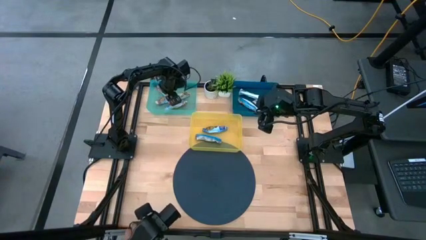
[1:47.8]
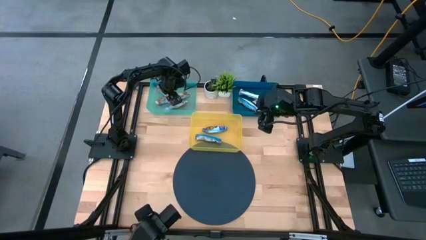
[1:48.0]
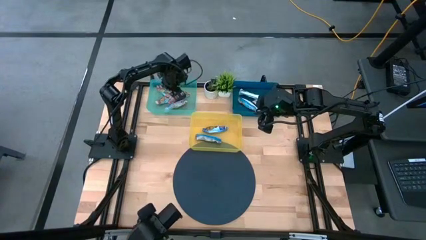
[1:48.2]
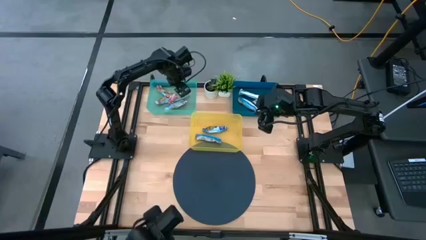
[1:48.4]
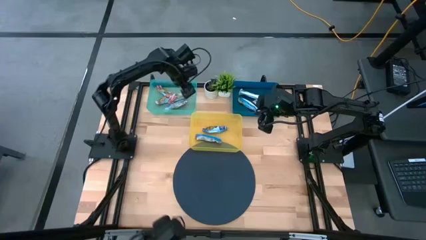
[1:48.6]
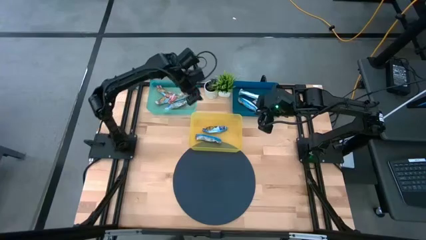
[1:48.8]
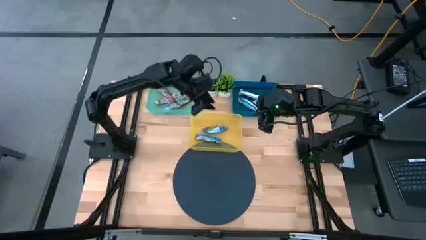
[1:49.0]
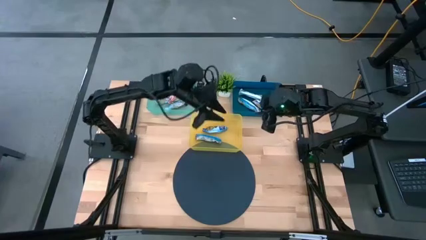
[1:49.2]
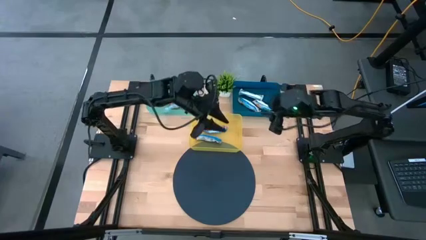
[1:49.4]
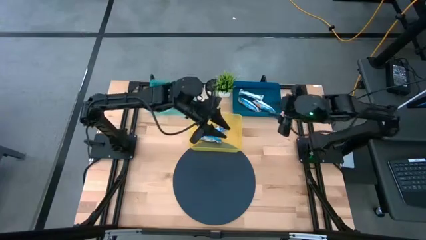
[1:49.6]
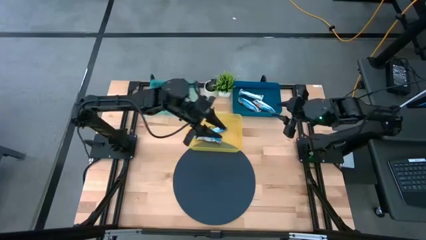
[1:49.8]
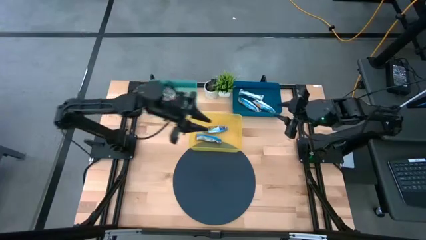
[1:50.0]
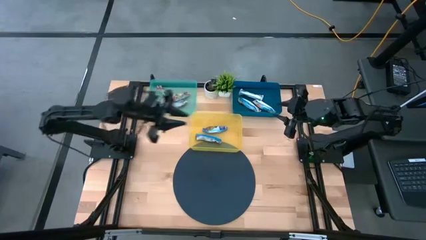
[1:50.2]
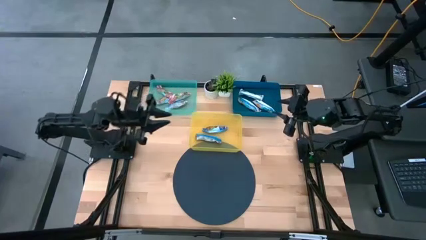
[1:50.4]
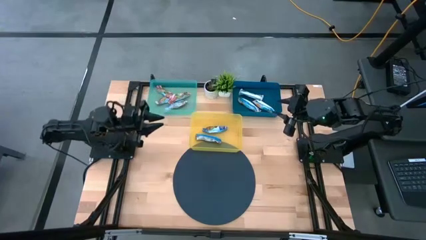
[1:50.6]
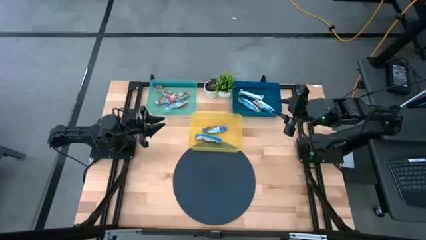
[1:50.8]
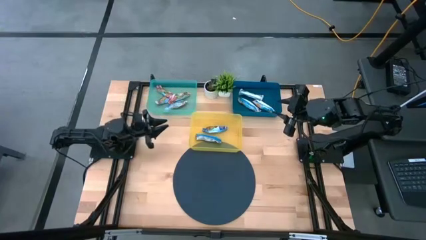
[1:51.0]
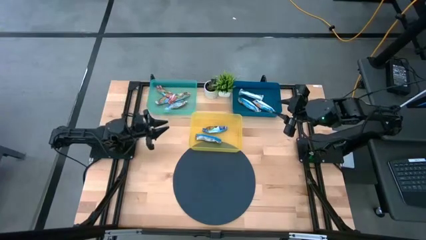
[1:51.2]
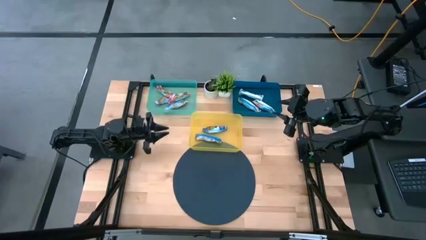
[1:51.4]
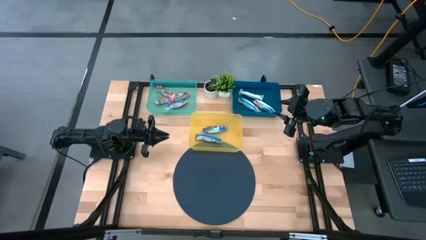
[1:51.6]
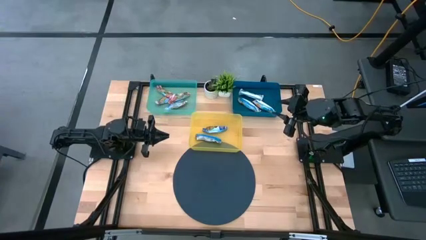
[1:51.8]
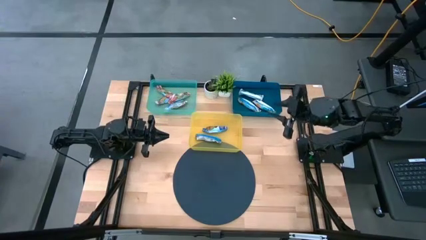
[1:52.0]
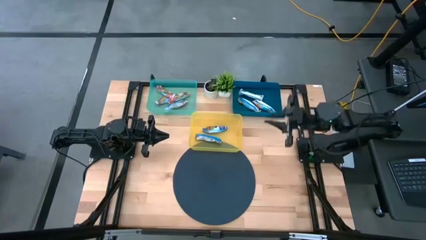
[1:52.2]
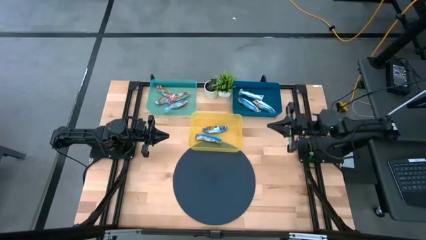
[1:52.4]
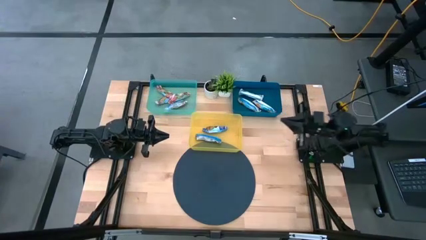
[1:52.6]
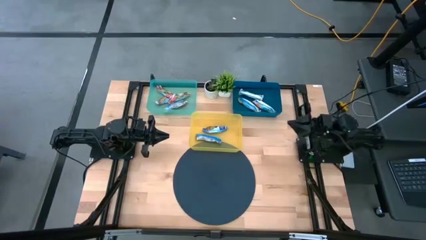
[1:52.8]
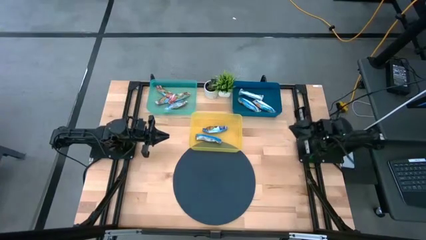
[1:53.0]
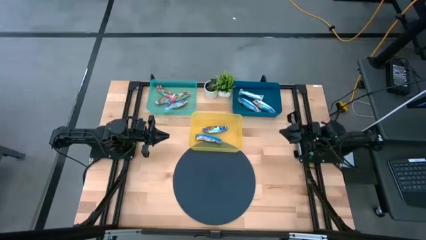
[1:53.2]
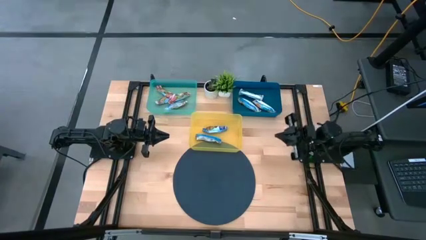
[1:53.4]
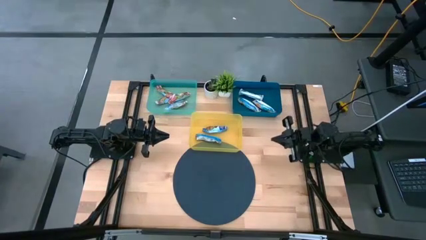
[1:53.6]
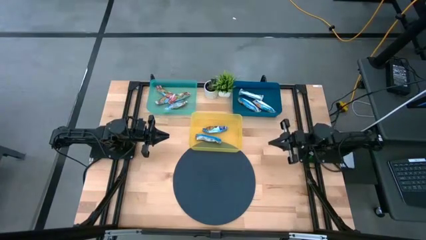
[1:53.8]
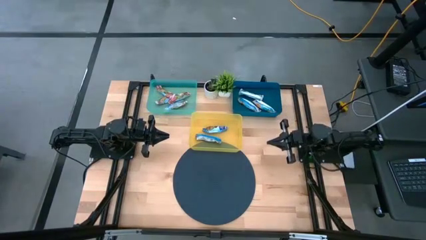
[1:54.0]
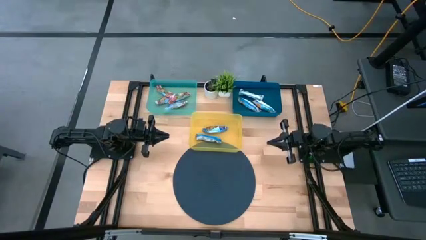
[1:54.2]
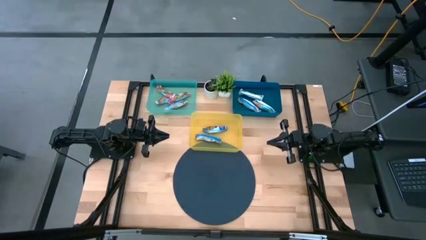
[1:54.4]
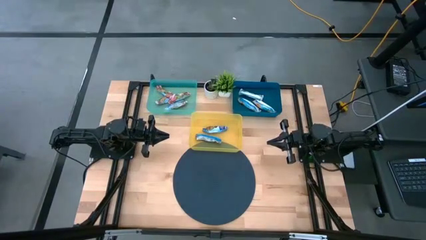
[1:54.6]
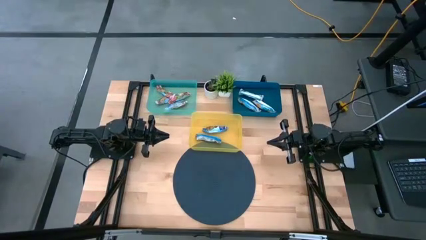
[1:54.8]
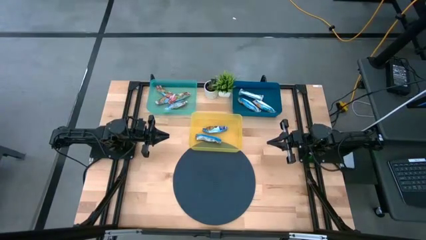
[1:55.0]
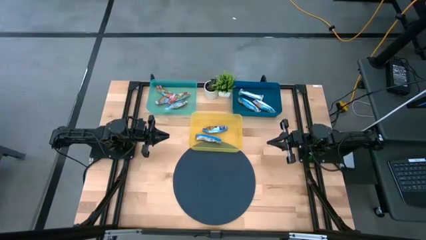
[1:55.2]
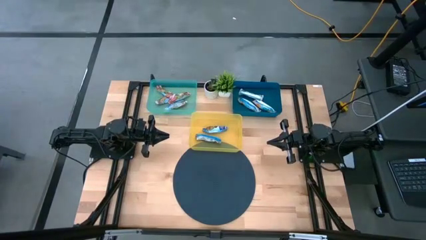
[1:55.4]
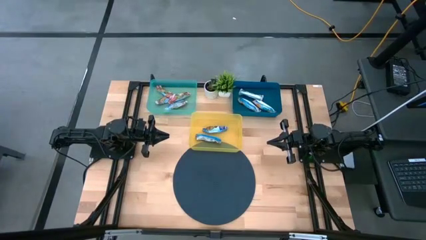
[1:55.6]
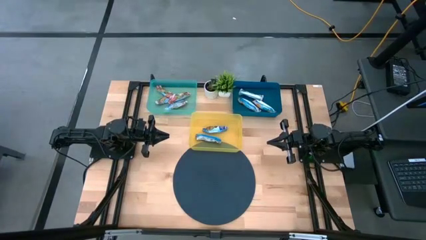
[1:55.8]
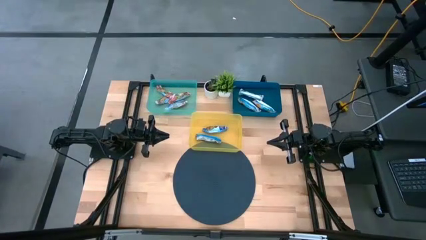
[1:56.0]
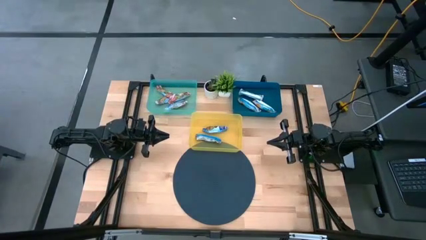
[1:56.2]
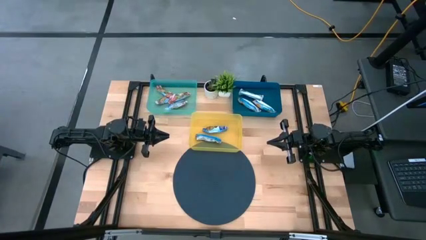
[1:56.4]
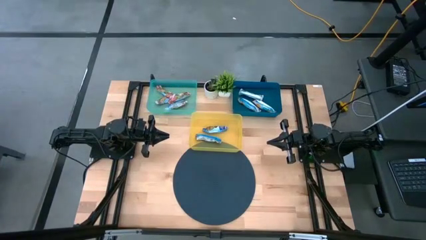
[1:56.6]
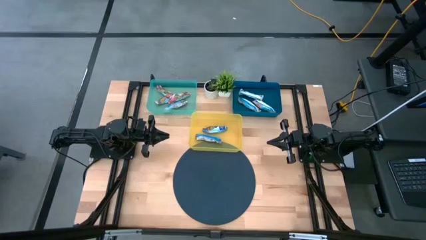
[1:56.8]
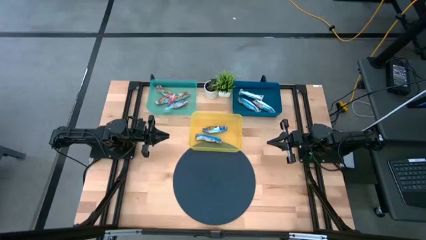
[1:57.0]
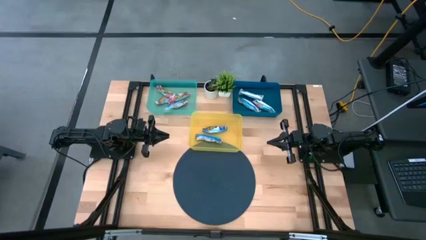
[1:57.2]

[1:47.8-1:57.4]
Task: Pick and place Granola Bars by type
Return to Home Position

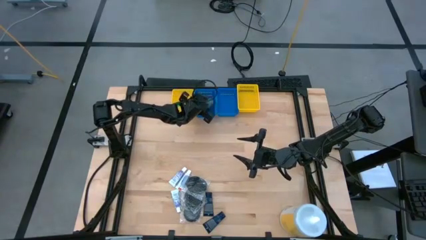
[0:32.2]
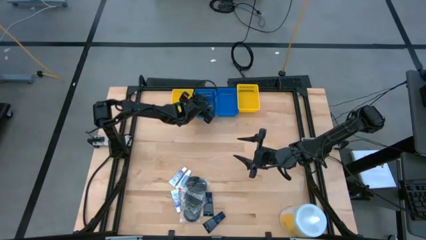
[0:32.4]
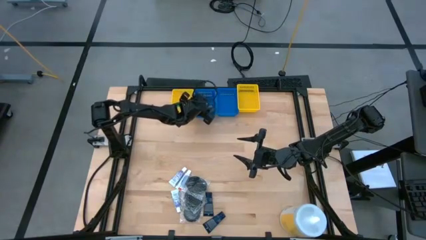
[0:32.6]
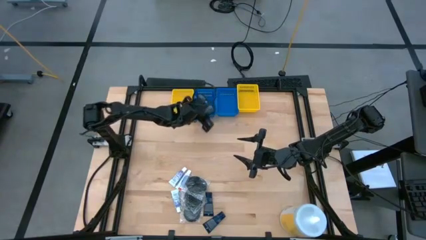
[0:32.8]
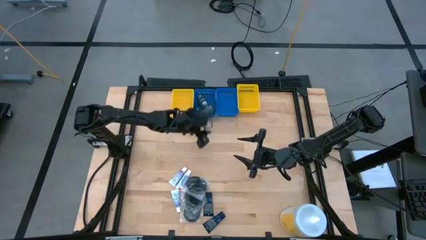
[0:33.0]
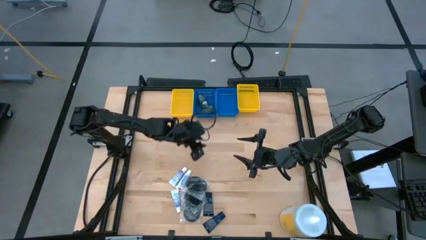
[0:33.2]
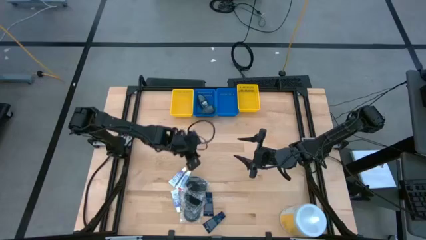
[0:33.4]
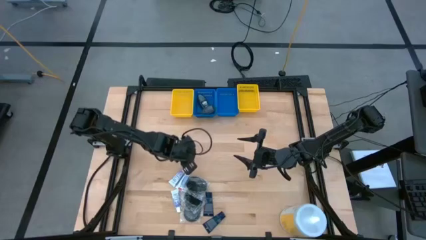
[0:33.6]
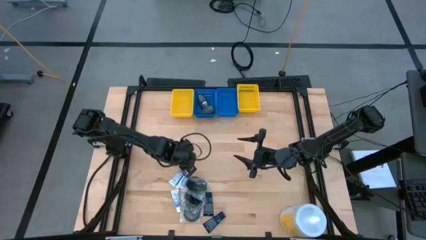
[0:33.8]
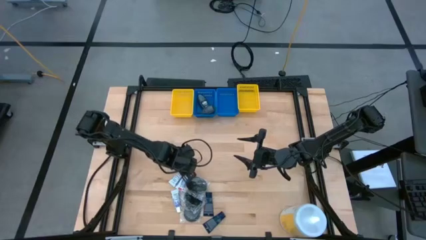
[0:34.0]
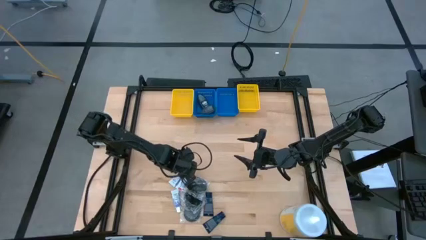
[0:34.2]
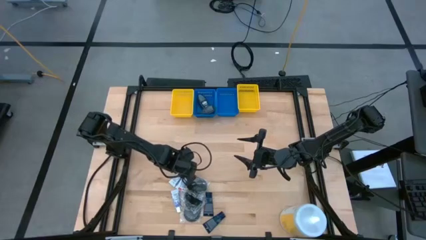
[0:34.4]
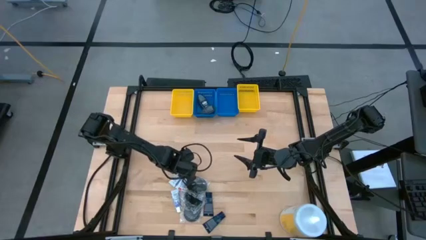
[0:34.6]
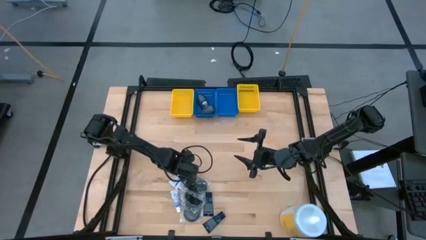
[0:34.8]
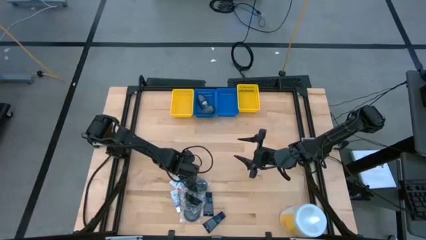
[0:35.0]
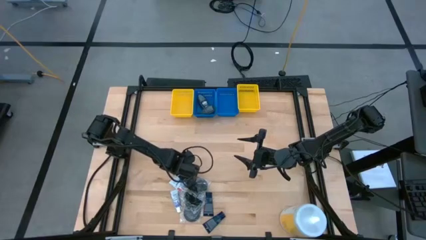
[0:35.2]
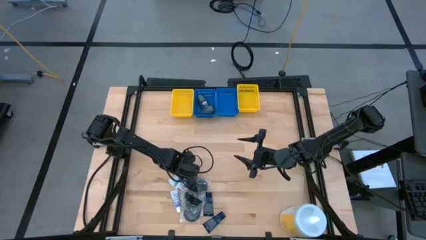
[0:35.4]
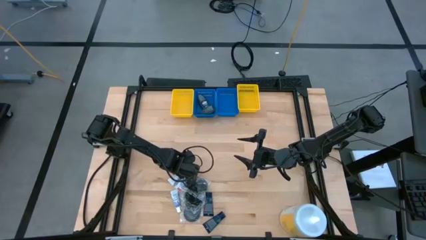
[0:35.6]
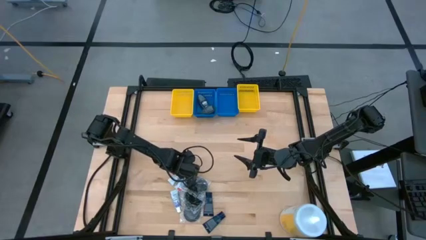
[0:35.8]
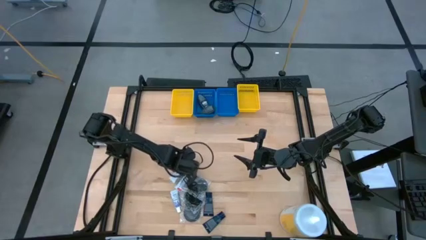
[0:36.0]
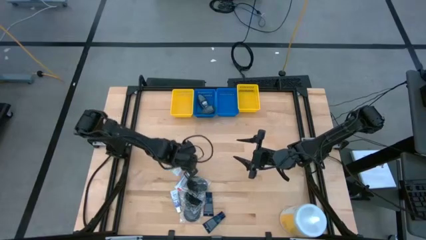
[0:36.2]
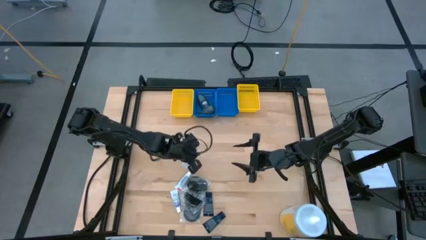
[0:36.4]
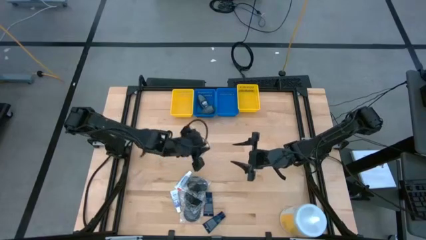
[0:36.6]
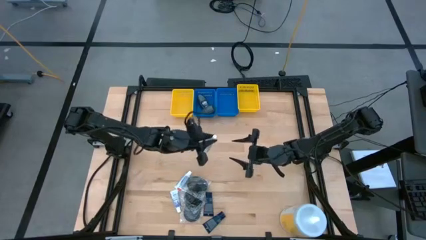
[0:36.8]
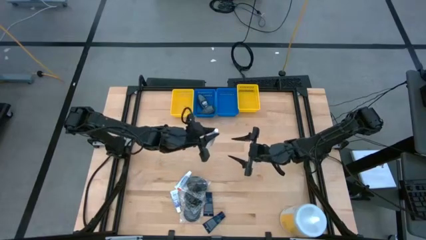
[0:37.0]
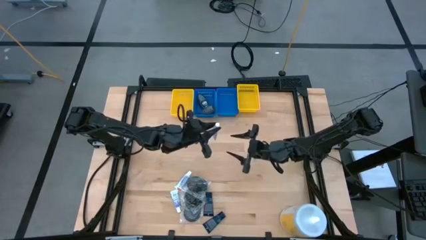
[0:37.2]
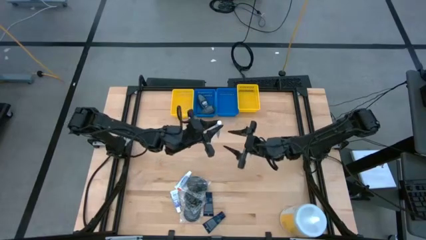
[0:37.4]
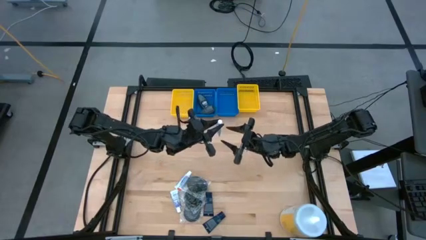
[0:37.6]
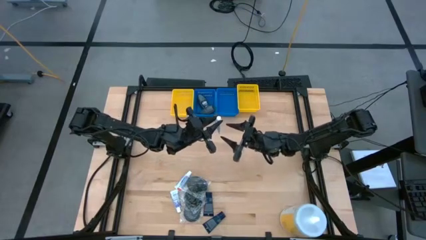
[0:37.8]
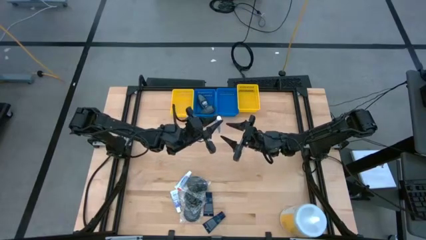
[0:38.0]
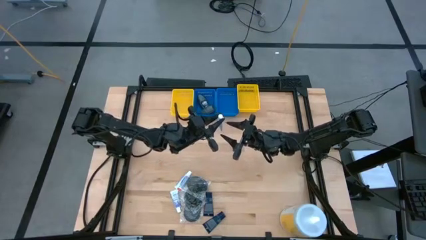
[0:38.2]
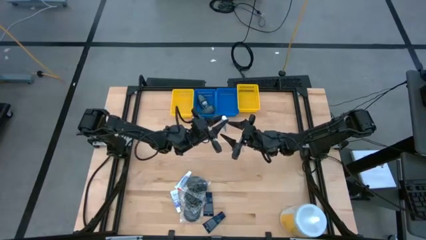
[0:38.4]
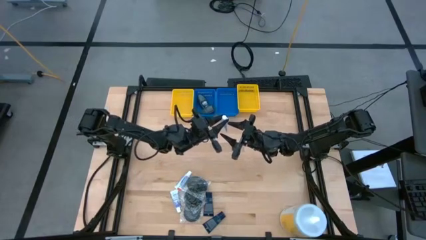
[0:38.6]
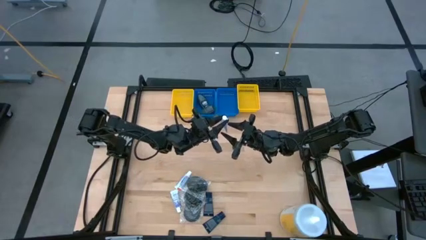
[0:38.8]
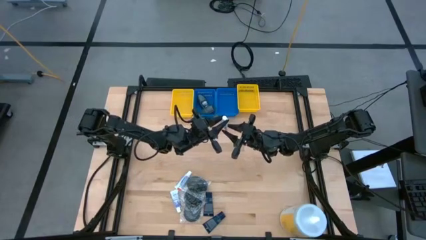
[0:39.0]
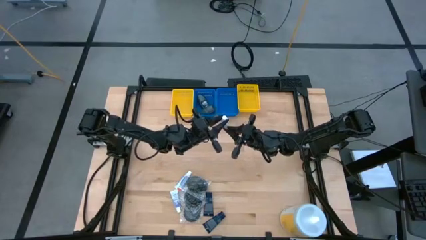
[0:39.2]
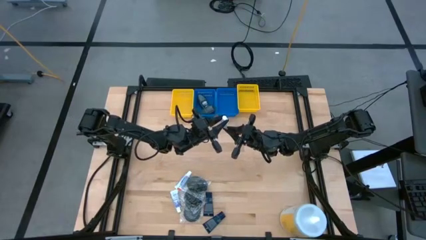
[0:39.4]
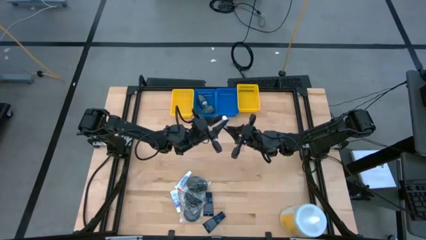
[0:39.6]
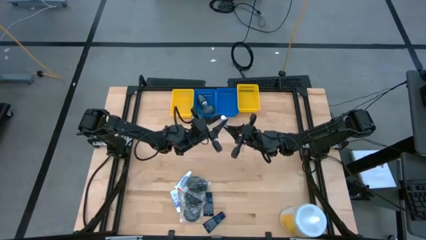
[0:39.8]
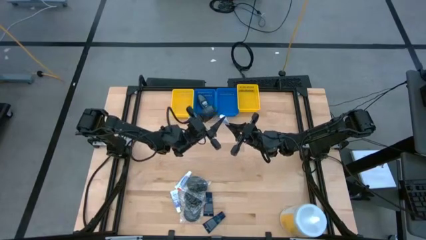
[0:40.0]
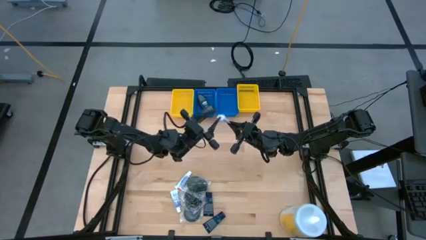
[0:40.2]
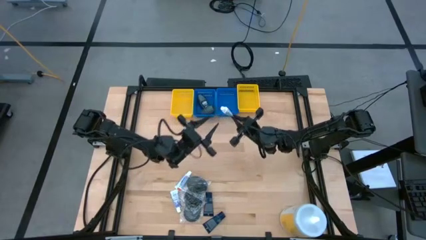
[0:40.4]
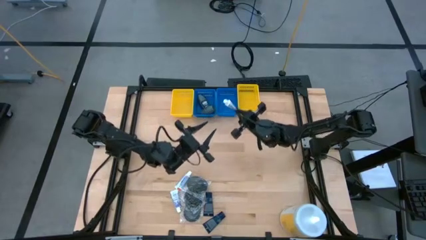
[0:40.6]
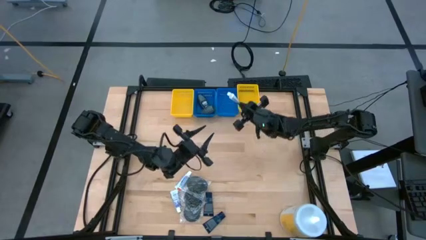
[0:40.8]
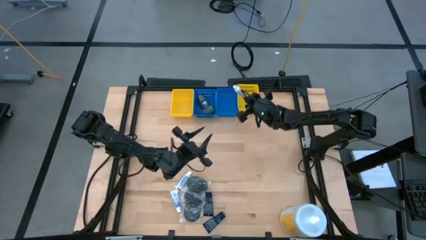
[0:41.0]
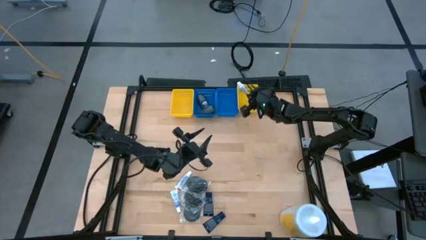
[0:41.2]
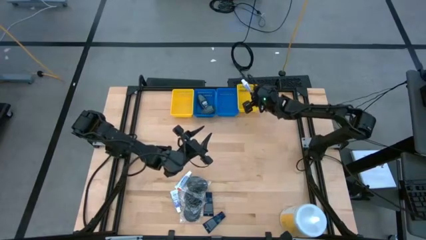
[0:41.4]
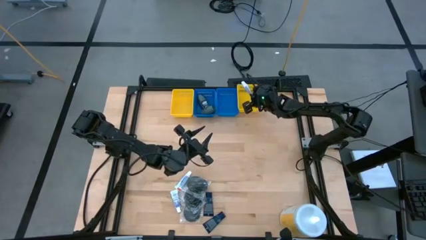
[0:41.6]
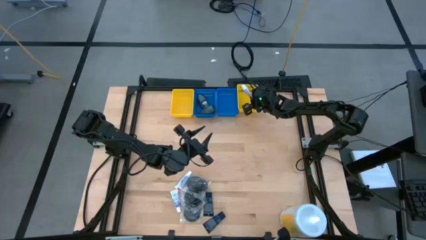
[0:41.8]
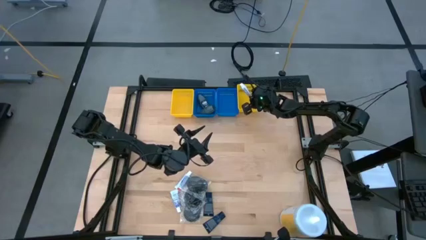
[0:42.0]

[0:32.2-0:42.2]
Task: Pick & Place Travel size toiletries
Put the white toothpaste into the right yellow bin
